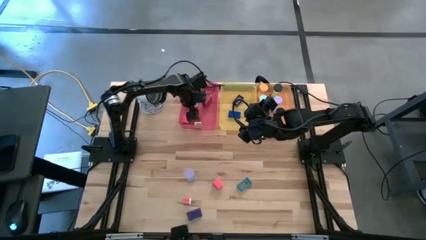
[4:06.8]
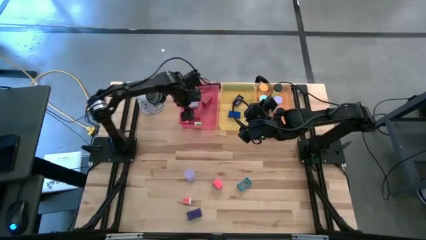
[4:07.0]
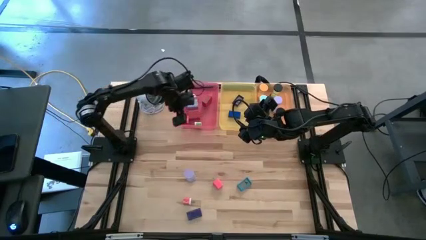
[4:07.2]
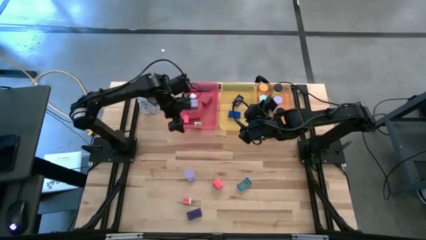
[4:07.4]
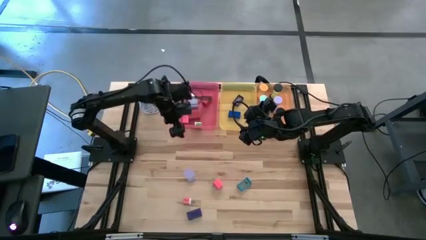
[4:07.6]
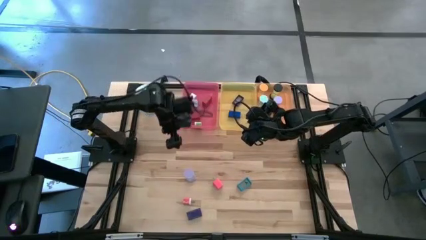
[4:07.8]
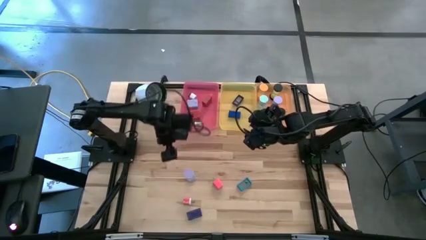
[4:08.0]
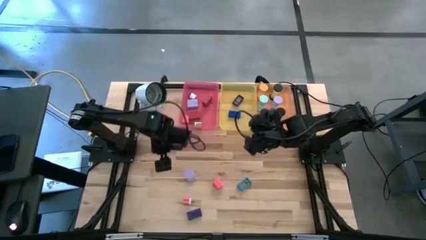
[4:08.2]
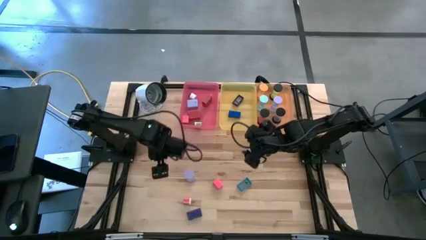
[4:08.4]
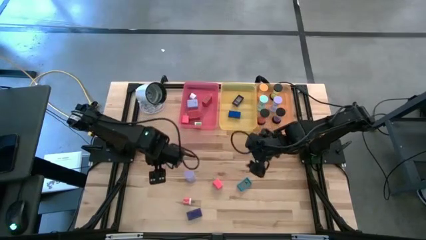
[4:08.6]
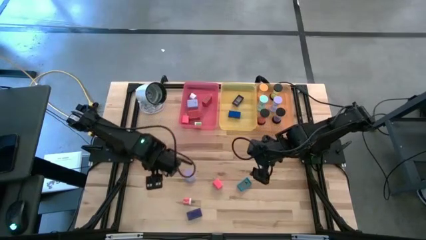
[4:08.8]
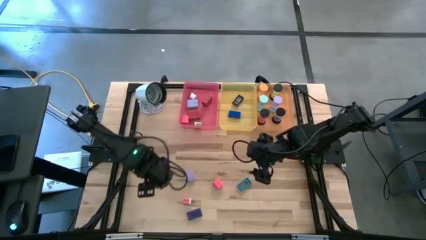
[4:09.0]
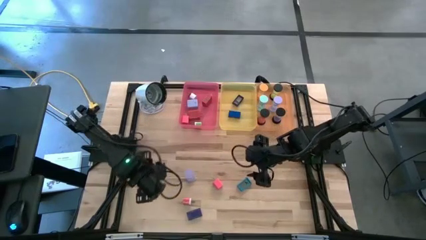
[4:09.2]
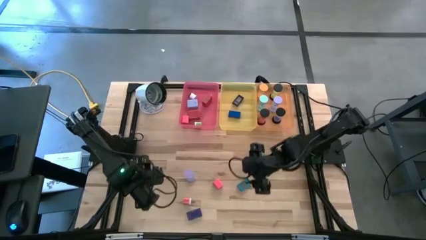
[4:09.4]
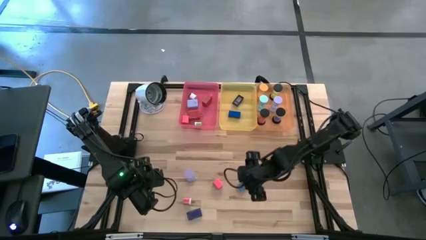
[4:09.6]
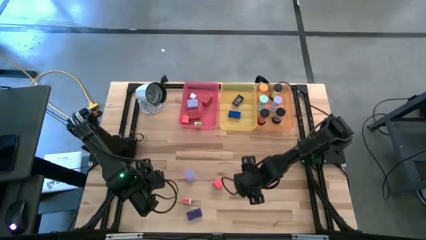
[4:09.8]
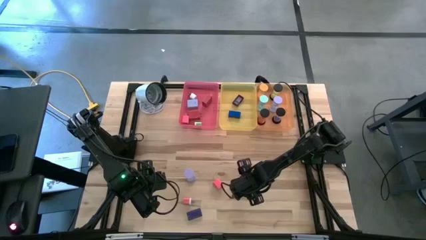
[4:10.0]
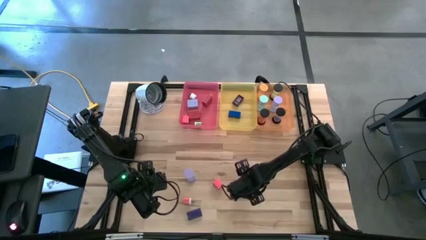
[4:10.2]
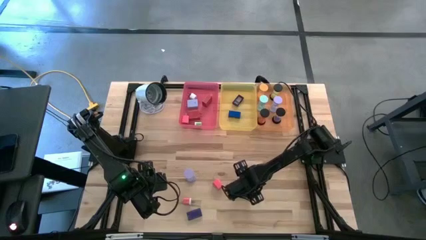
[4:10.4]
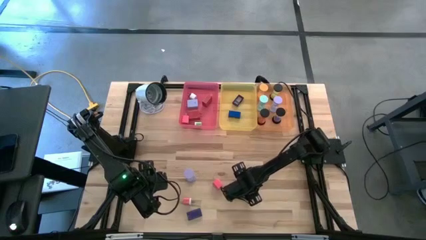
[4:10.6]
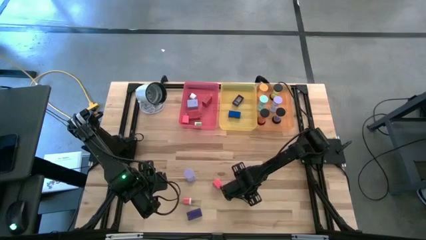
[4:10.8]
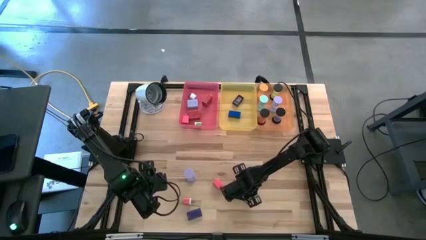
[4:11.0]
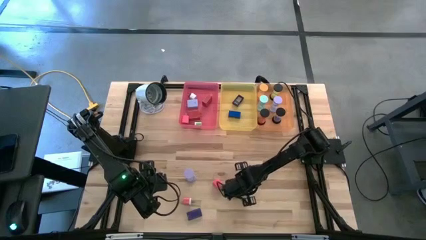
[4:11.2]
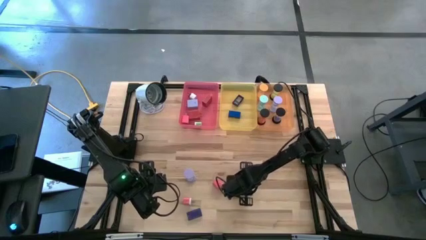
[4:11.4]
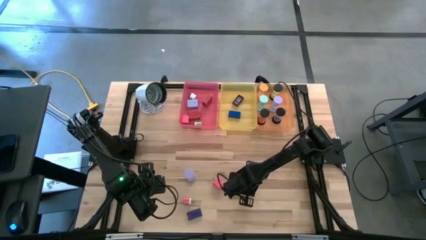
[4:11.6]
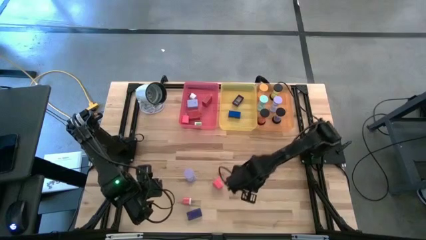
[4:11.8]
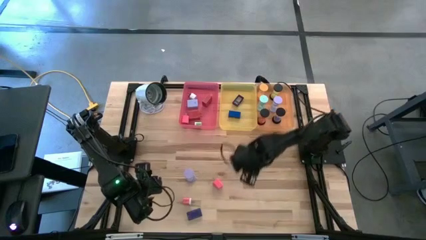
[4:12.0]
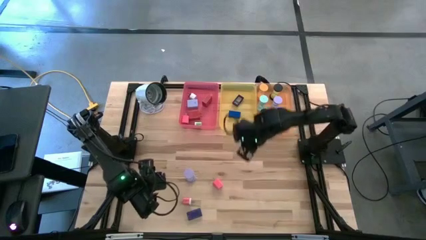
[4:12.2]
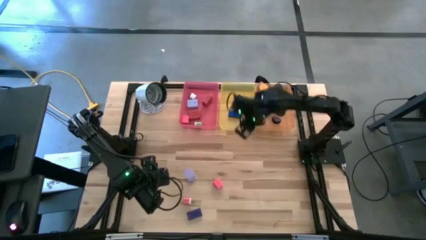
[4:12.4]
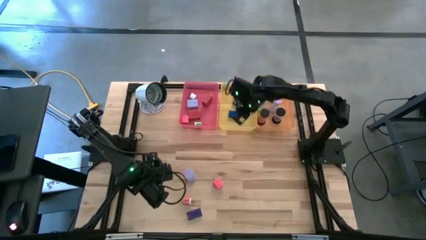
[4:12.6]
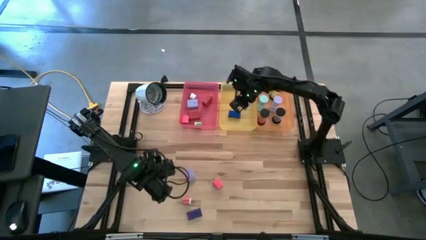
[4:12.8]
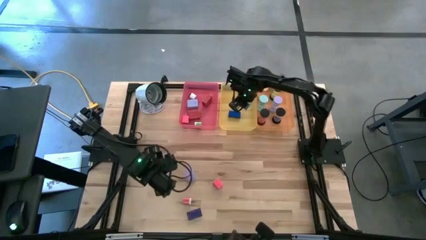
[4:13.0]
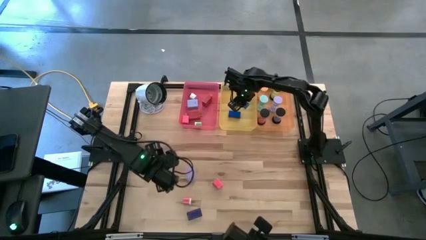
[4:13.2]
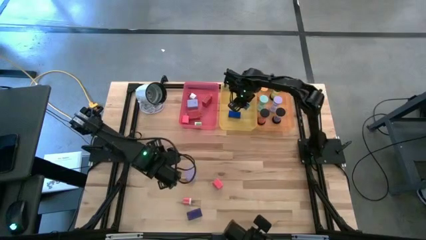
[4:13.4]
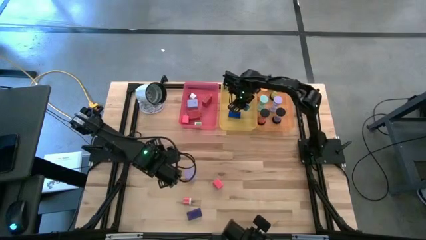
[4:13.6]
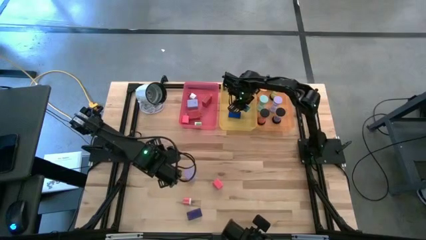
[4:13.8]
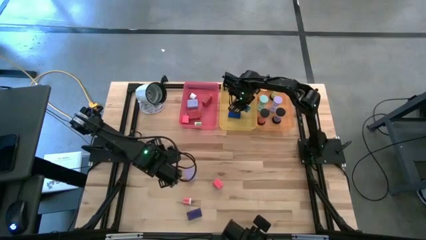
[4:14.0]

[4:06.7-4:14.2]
Task: Pick & Place Office items
Put the light blue digital clock into the yellow bin

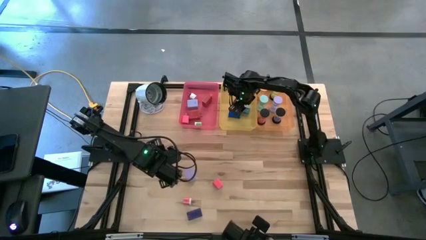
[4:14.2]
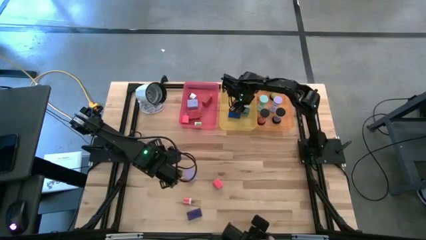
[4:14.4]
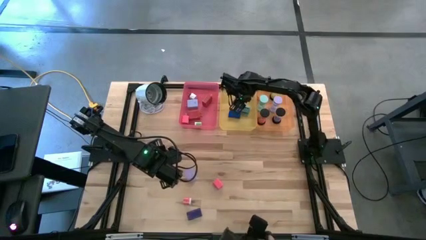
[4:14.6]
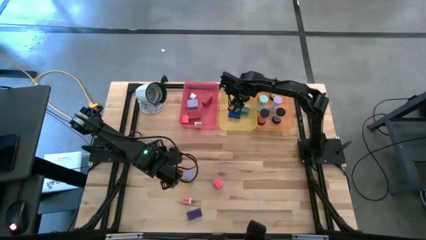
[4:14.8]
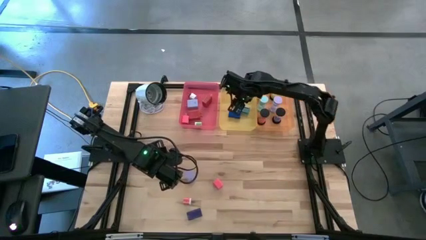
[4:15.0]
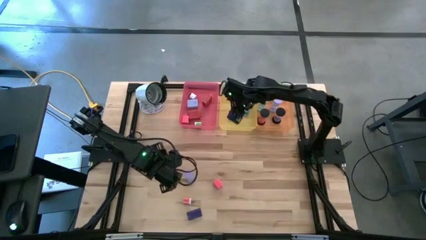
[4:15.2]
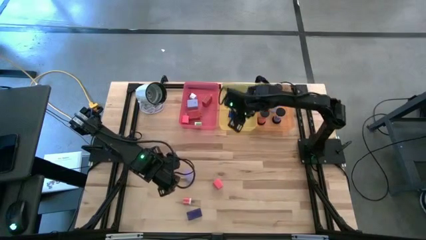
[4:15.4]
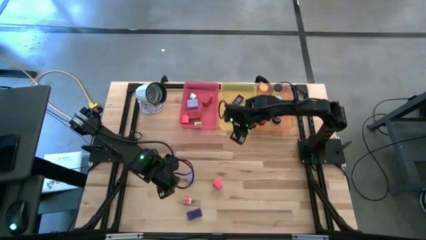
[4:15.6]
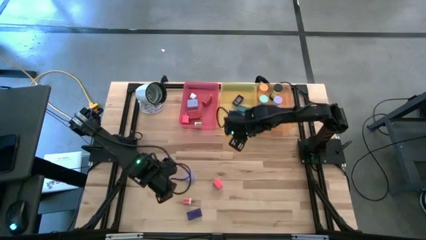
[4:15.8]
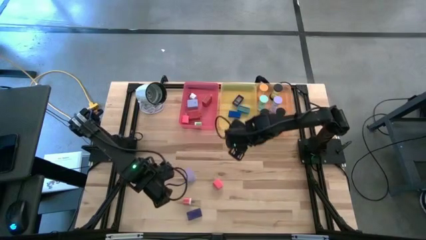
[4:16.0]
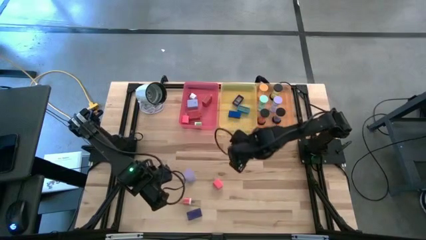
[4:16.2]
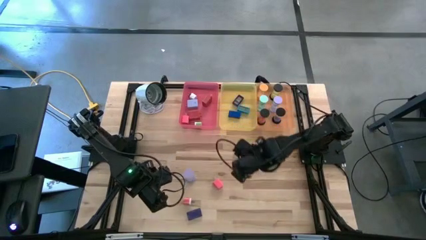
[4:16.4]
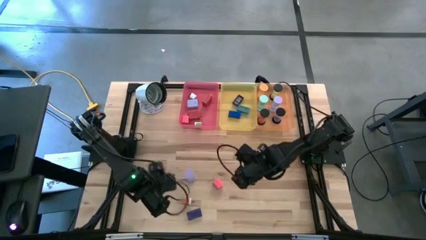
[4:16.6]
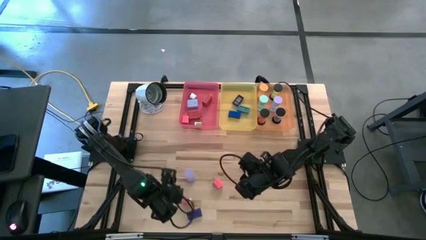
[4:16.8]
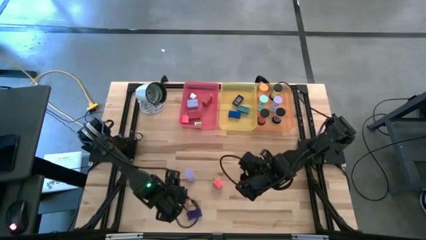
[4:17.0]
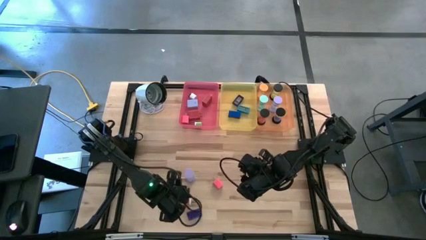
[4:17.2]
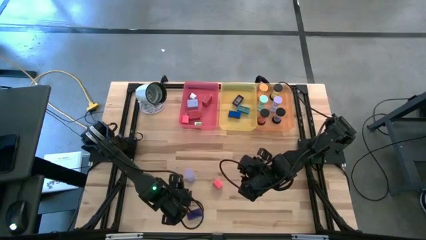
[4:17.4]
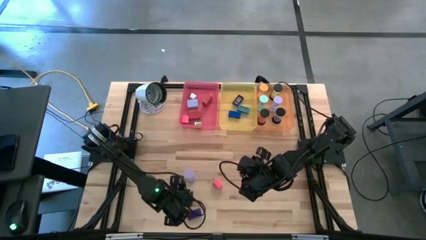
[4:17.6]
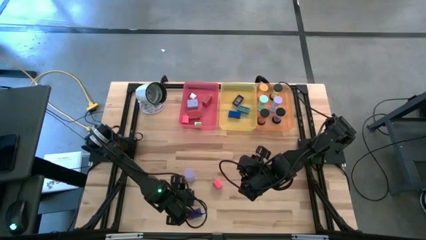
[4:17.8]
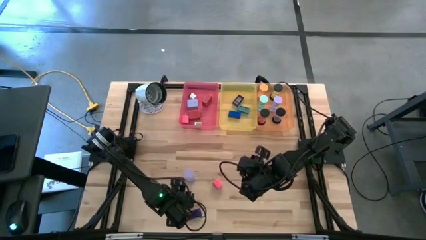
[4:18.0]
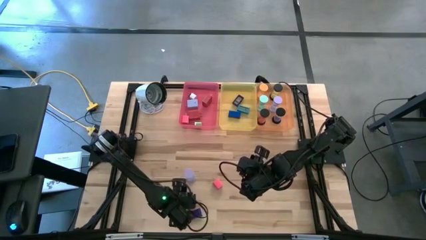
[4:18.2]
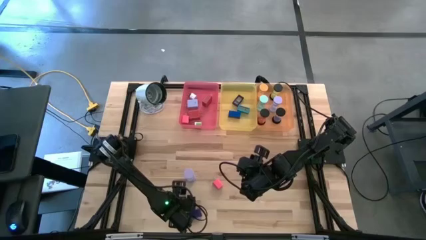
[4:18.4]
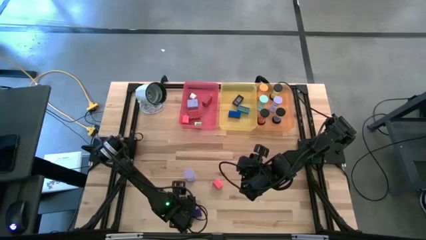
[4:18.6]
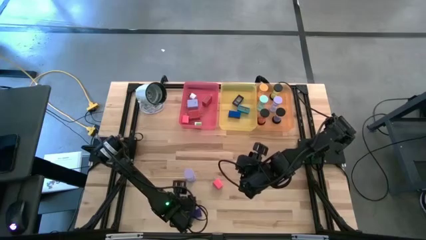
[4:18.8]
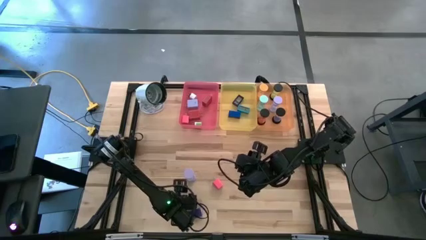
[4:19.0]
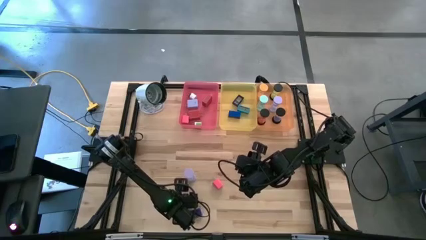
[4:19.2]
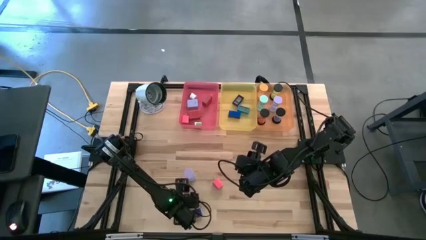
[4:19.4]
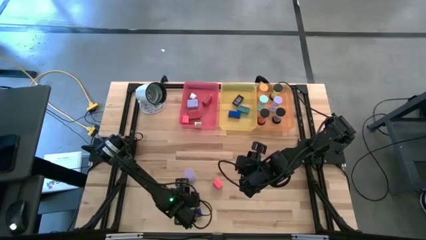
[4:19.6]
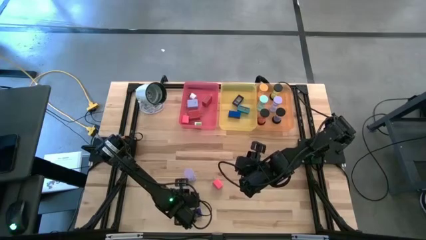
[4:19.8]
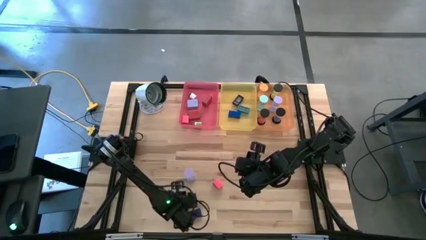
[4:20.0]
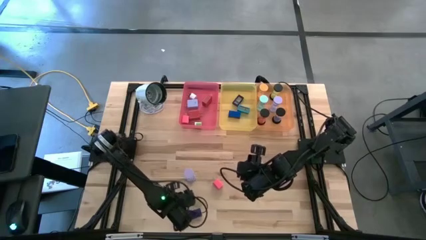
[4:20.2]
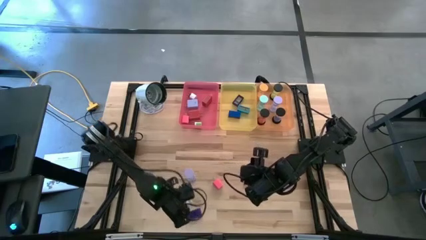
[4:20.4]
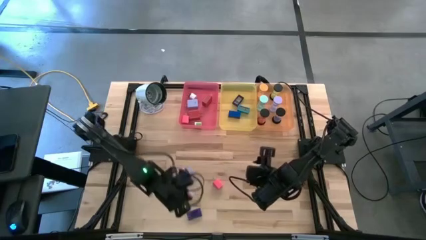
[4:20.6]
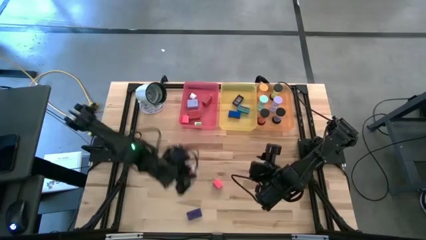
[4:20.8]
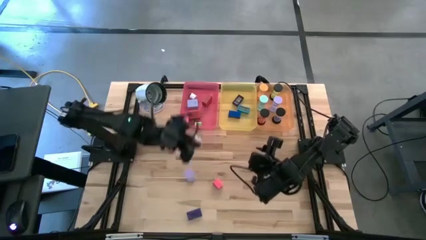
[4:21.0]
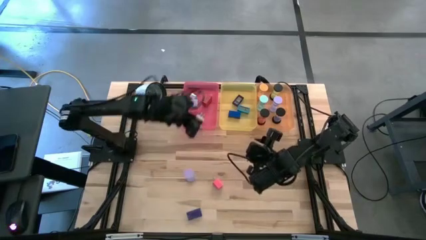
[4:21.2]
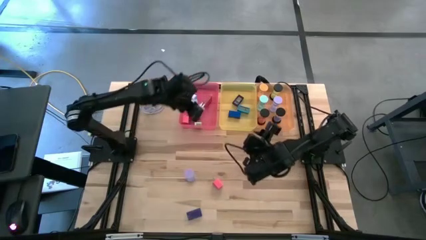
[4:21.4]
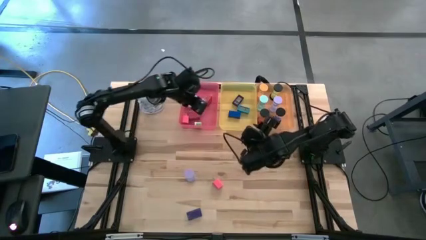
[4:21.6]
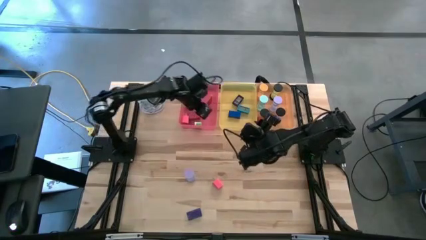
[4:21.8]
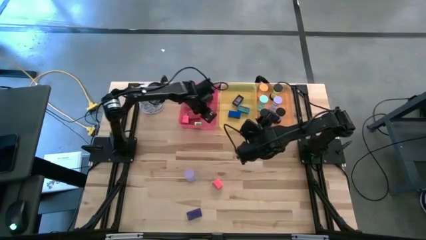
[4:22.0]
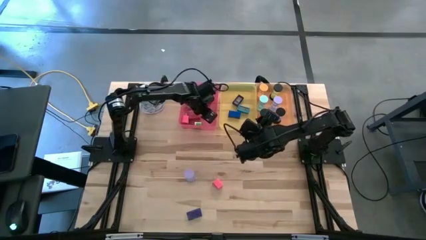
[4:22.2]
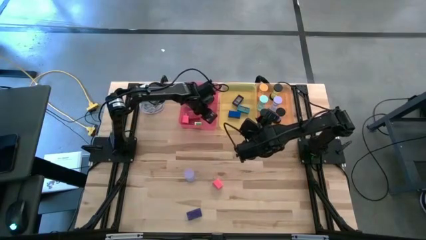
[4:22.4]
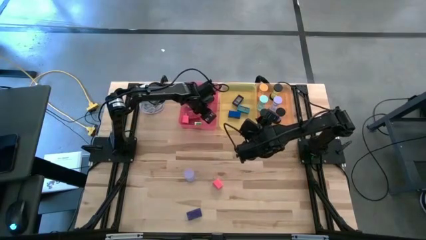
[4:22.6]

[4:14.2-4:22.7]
Put the pink white charger adapter into the red bin
